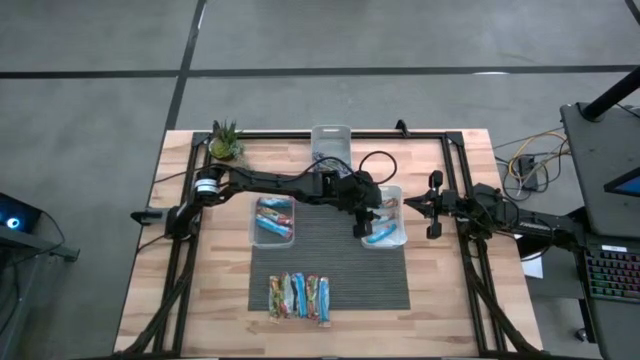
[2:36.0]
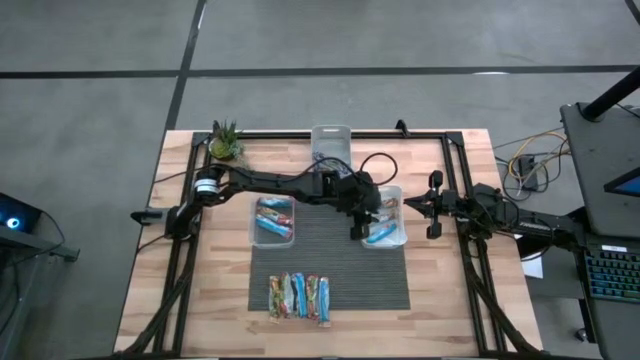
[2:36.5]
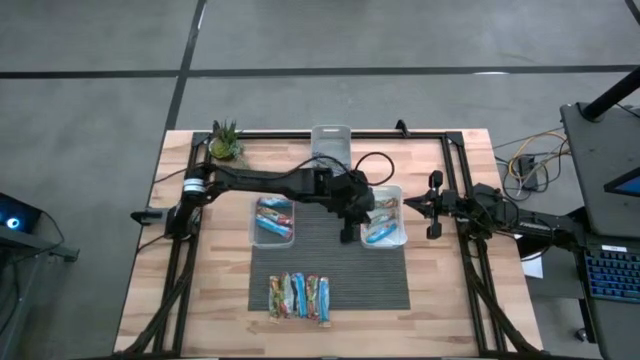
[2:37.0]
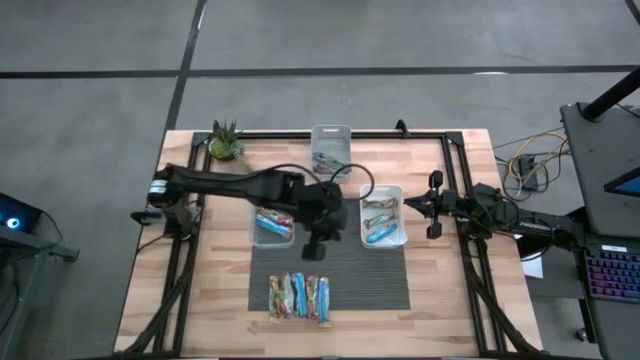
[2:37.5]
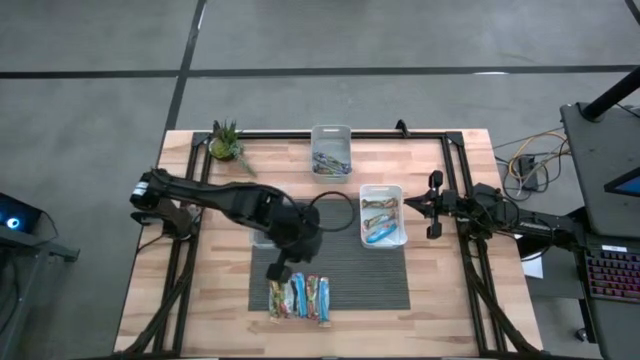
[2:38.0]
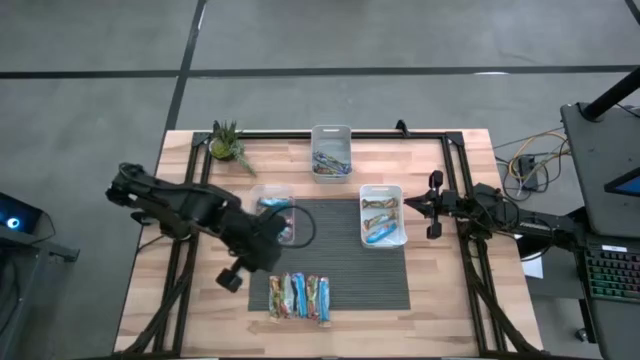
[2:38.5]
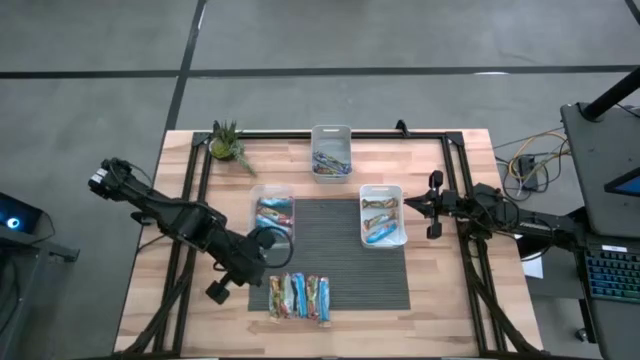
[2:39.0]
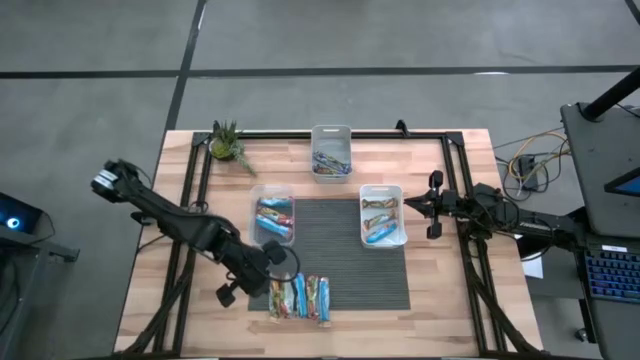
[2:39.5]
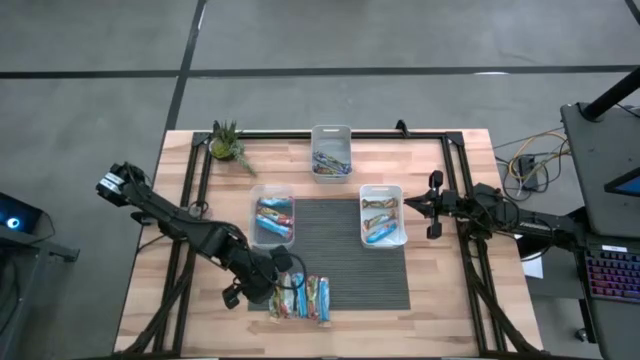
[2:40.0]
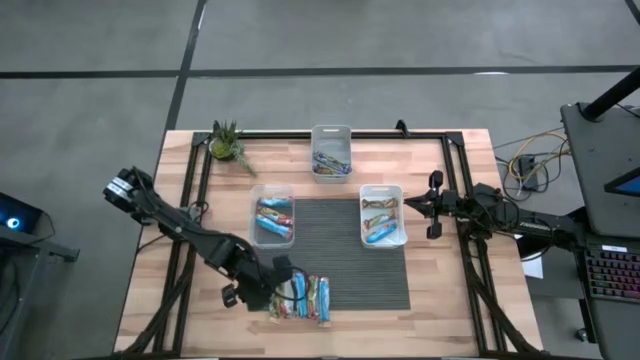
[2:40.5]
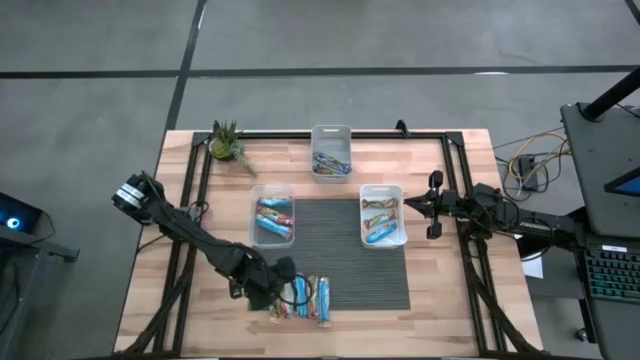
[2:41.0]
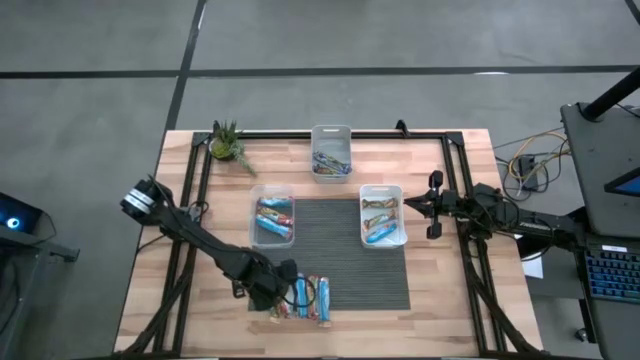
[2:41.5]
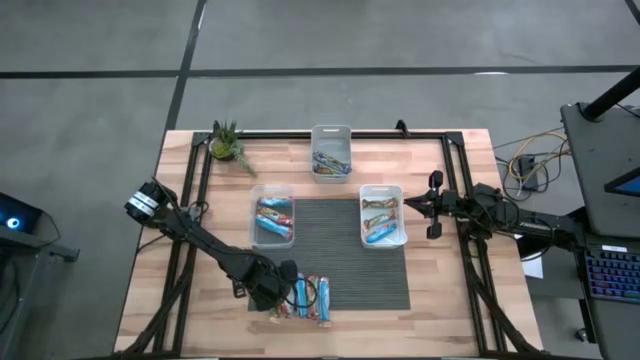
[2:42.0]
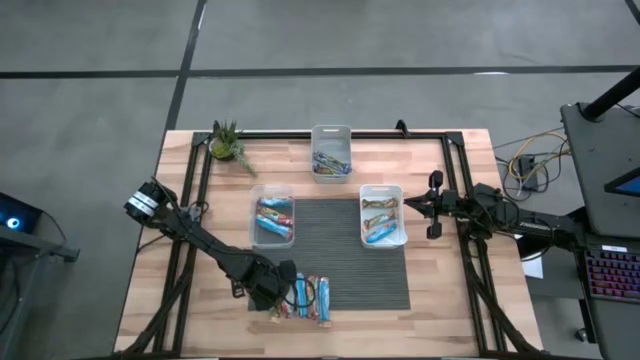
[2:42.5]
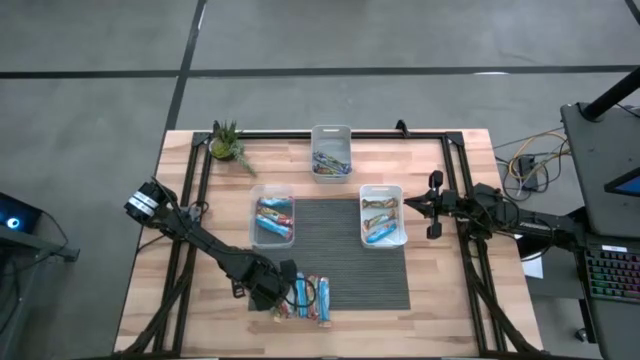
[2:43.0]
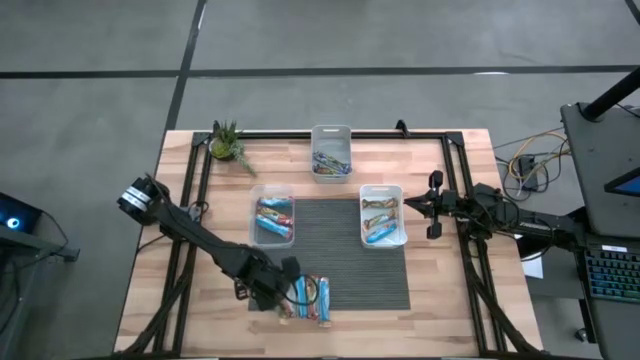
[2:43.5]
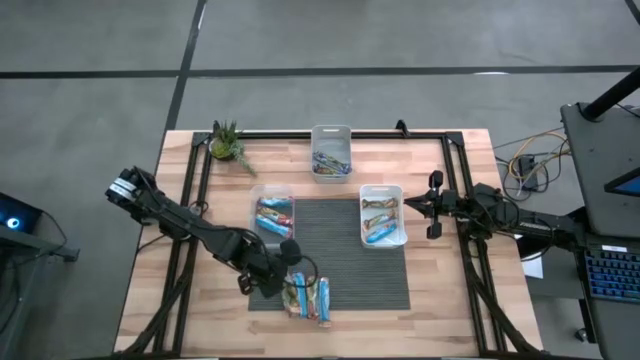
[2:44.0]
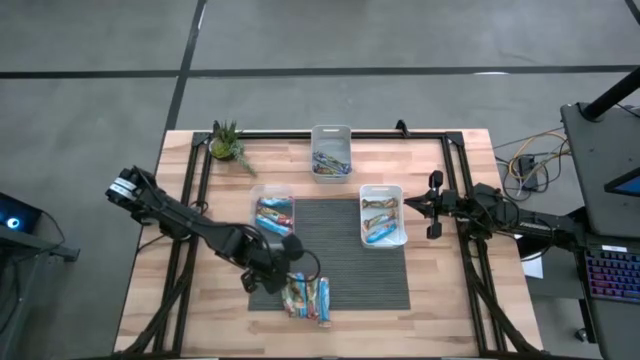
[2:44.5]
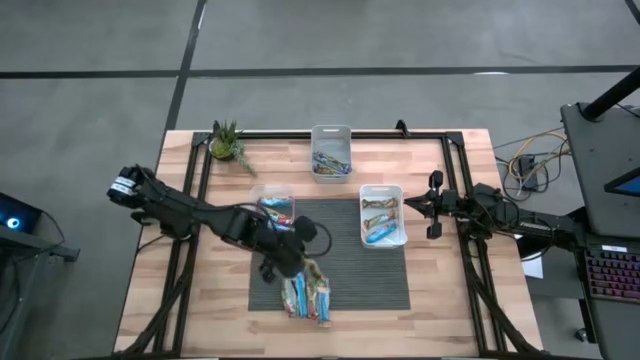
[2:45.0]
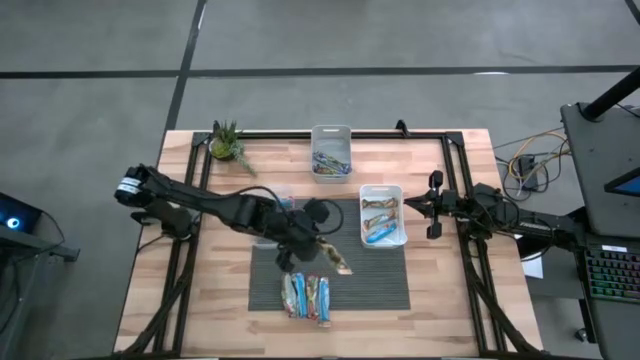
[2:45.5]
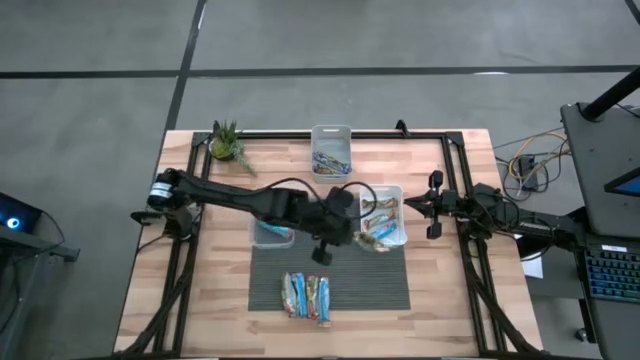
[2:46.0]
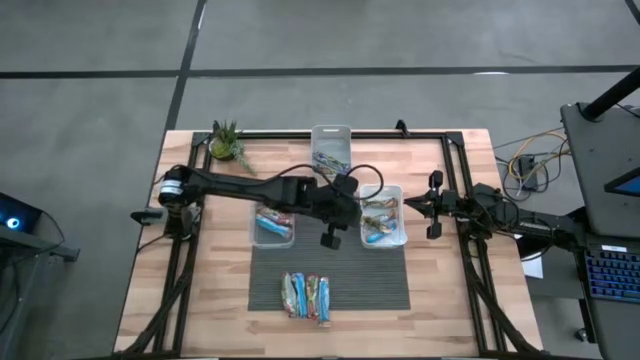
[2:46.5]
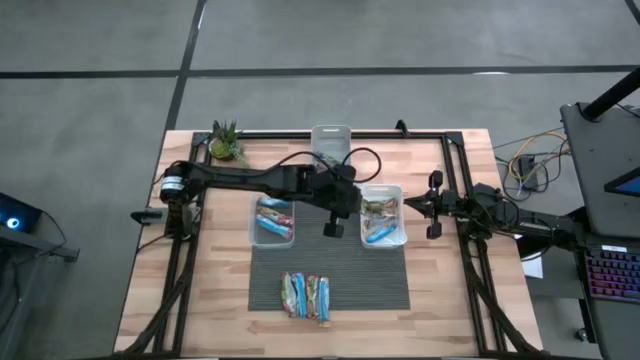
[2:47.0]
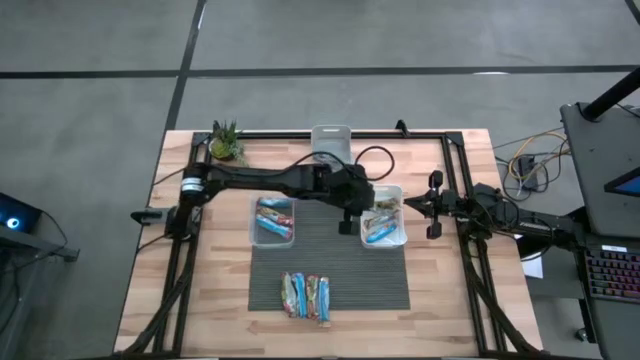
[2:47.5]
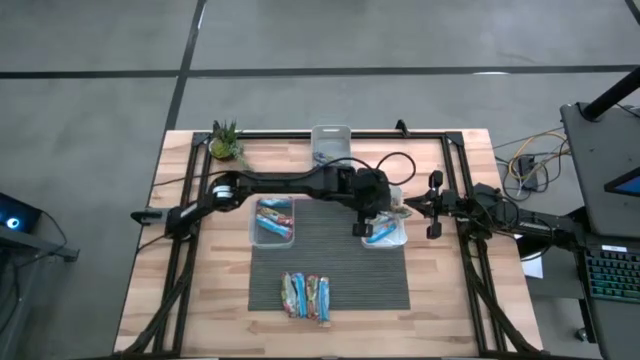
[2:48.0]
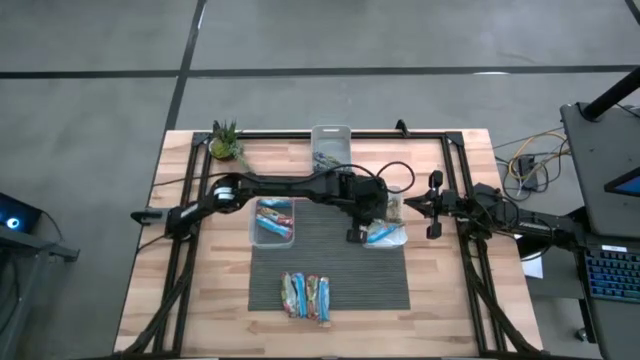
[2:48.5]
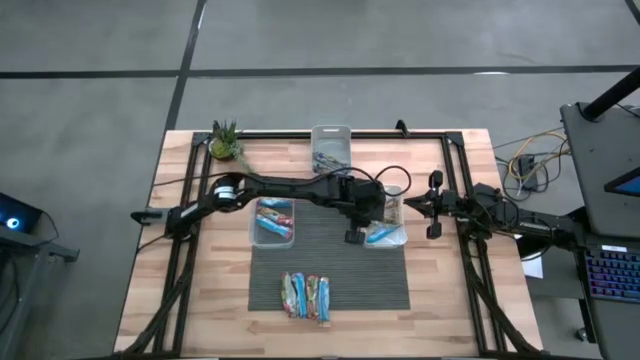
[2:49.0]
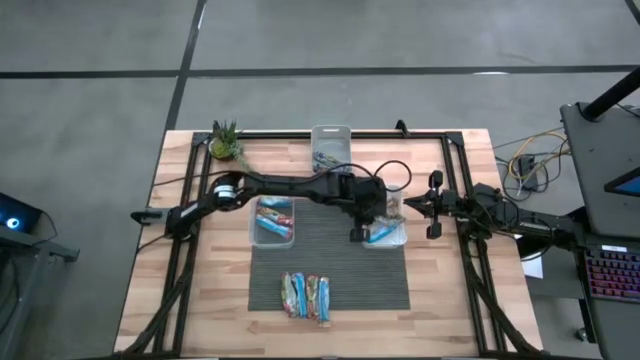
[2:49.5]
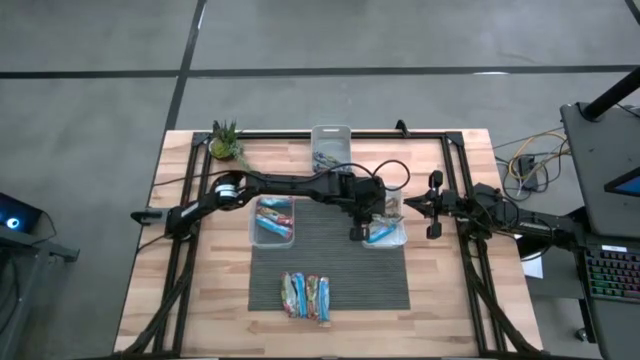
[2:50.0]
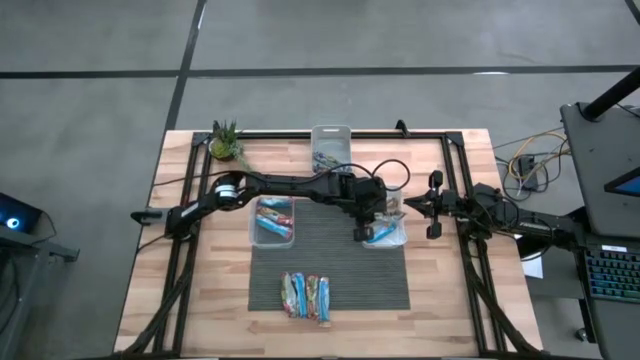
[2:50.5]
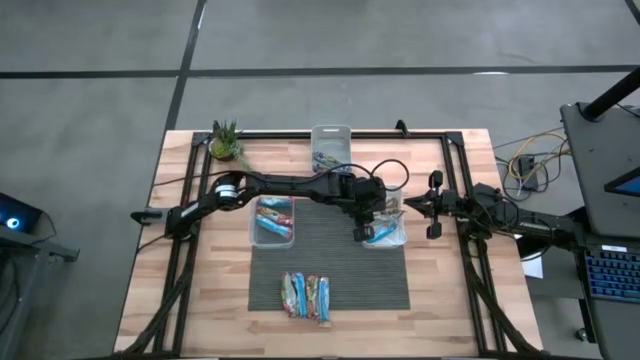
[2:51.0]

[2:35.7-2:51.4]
Task: Pick and place Granola Bars by type
Put the yellow granola bar into the white bin

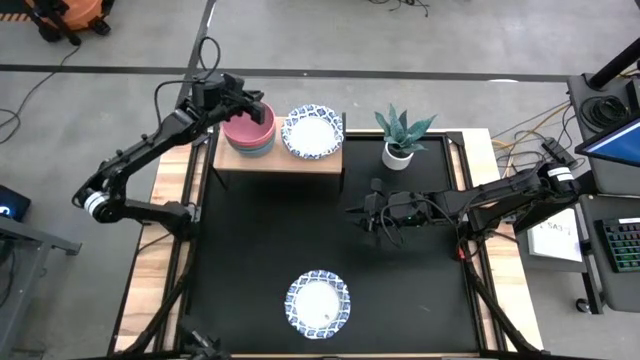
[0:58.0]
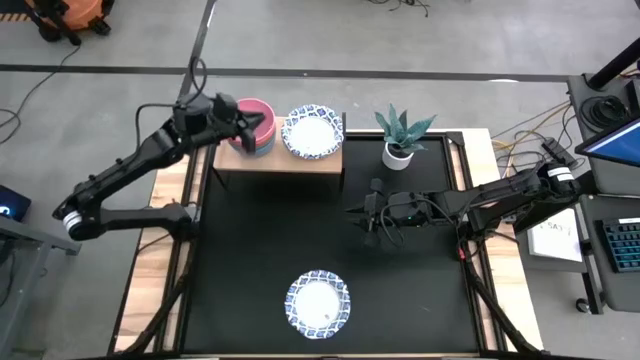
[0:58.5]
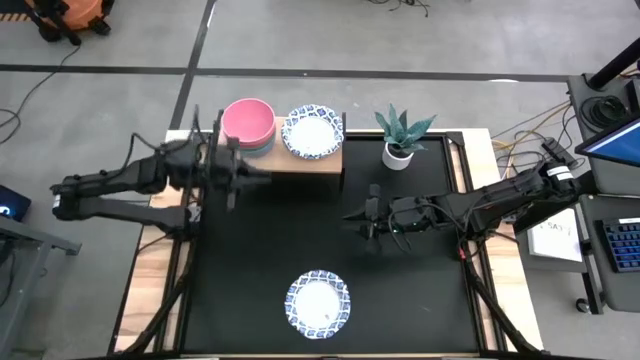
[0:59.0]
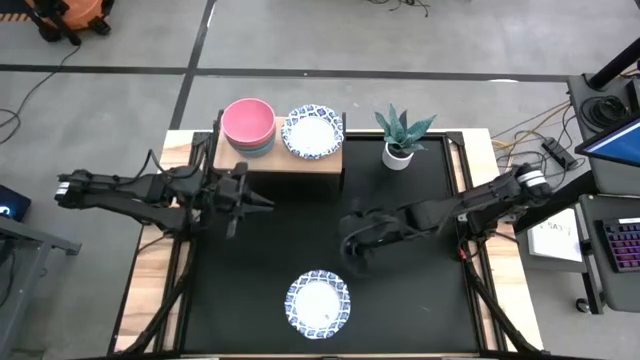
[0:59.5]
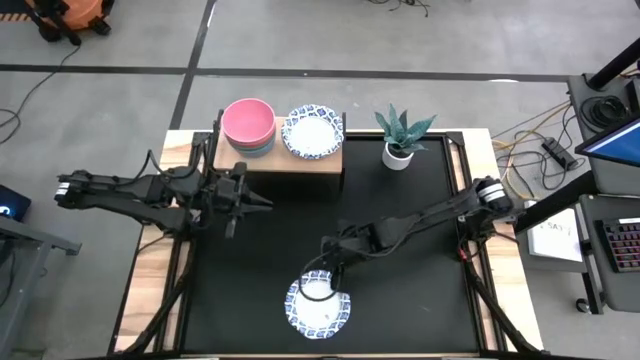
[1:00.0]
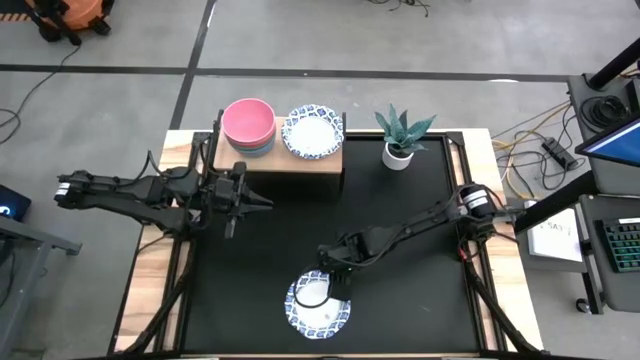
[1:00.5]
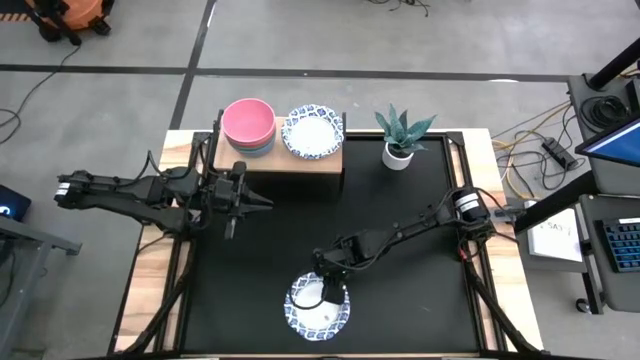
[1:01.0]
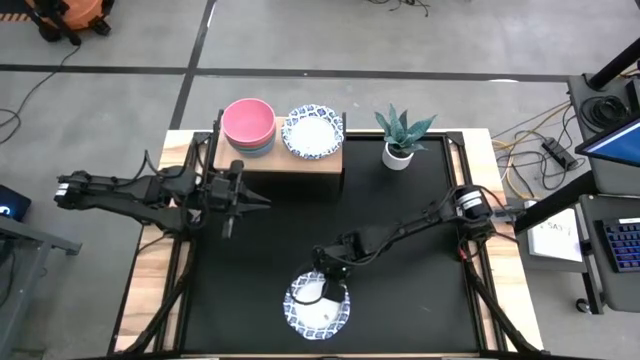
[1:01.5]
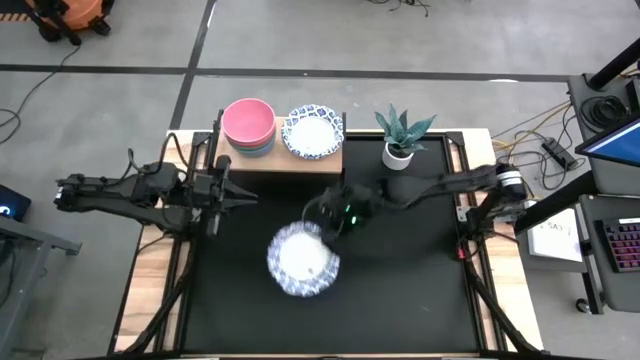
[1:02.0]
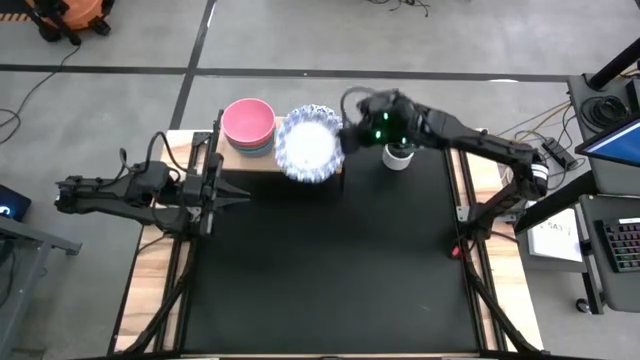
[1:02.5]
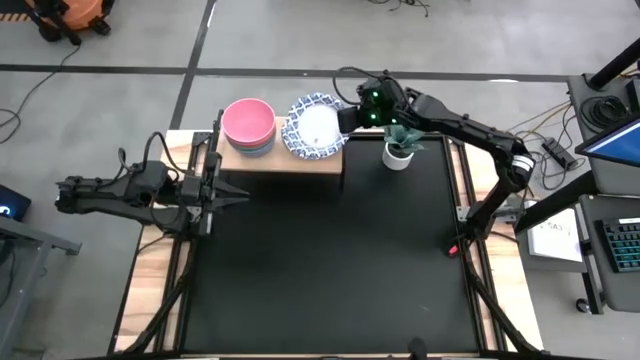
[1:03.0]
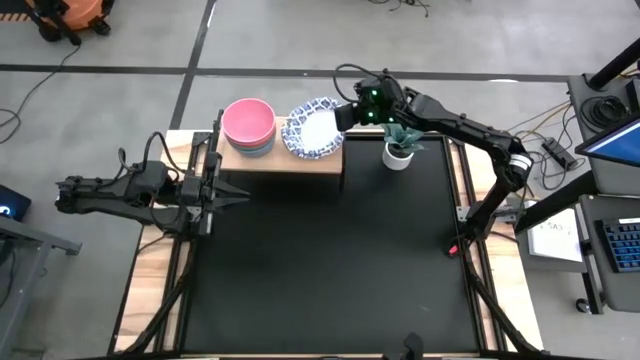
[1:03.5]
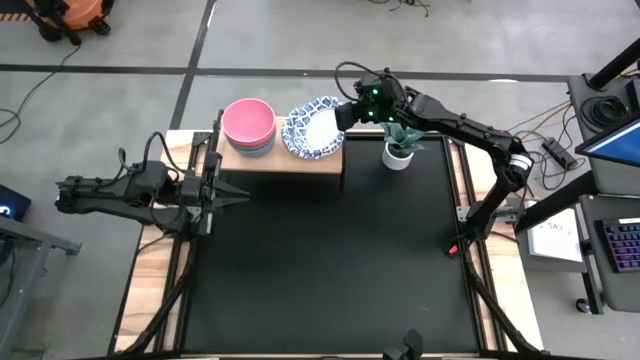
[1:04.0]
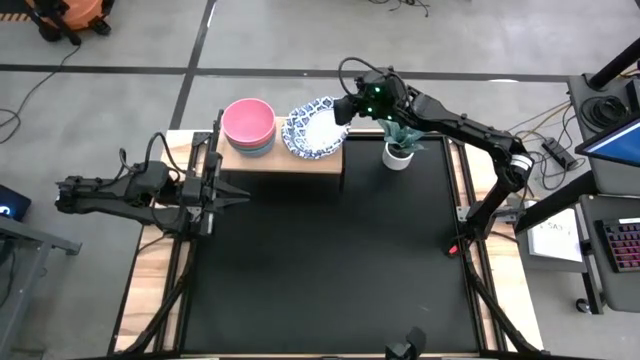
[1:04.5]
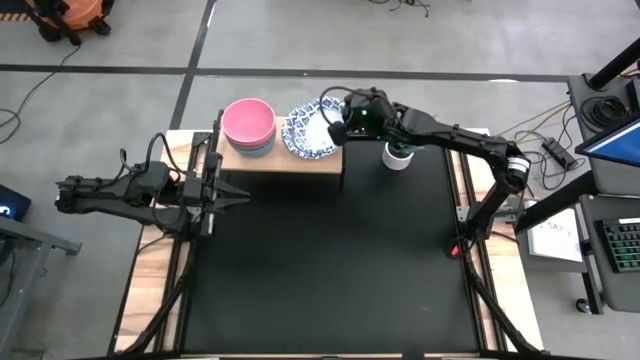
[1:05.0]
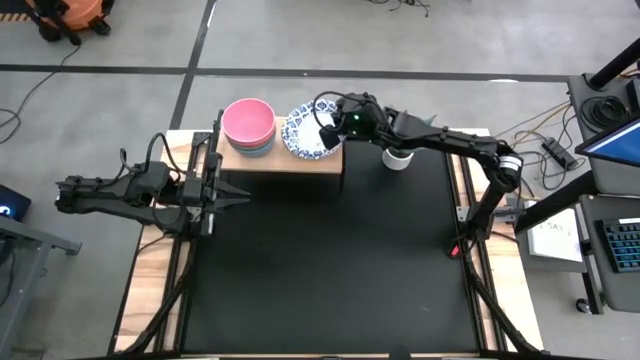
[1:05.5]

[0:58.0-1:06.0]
Task: Place and stack bowls onto a shelf
Stack the white patterned bowl on top of the other white patterned bowl on the shelf
